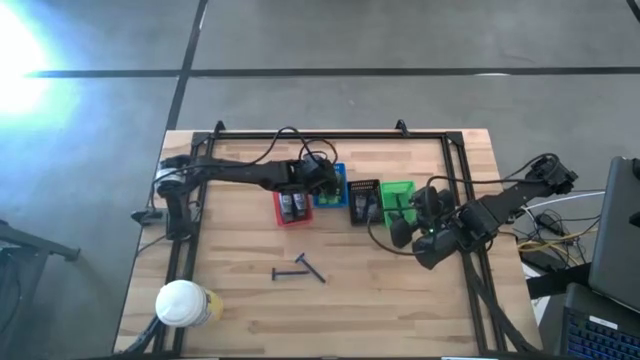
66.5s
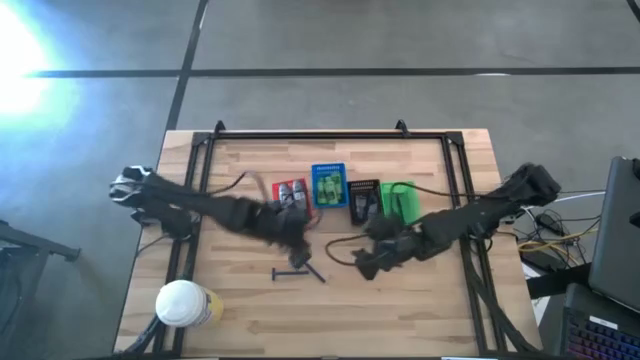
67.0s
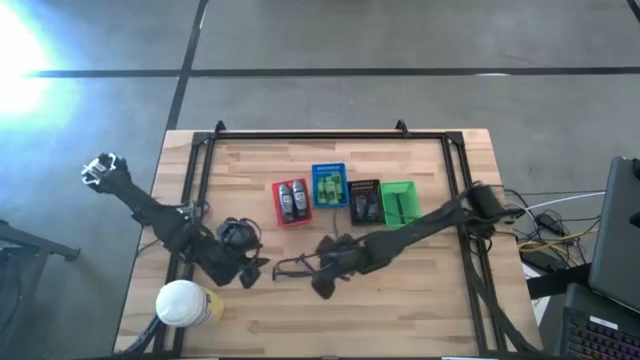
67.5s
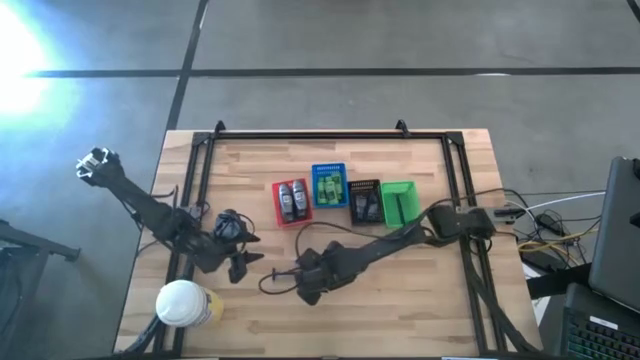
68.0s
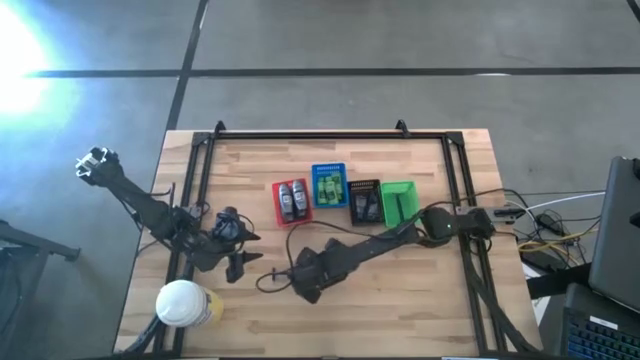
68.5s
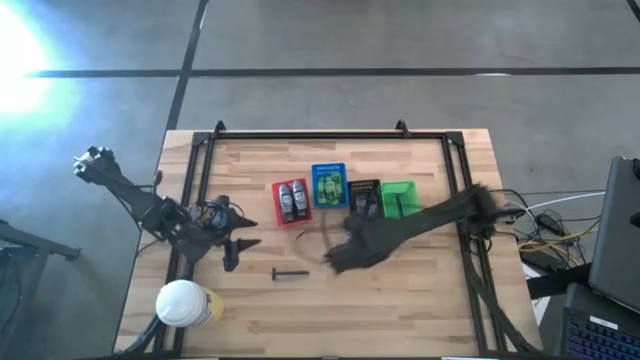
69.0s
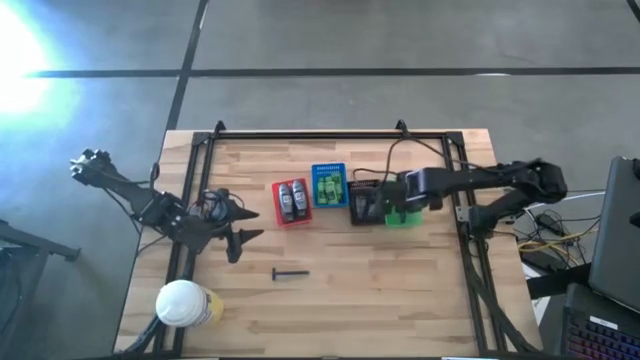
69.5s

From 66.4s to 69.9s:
Task: Pick & Place Travel size toiletries
Put the blue razor into the green bin

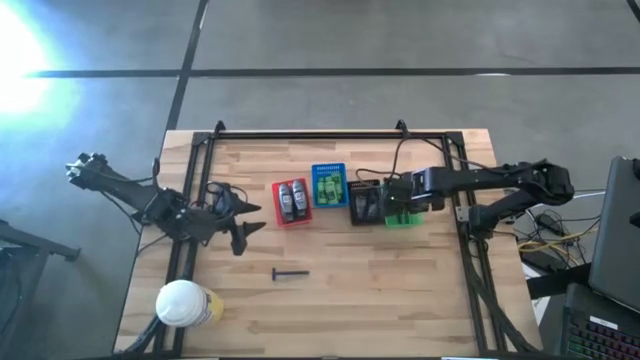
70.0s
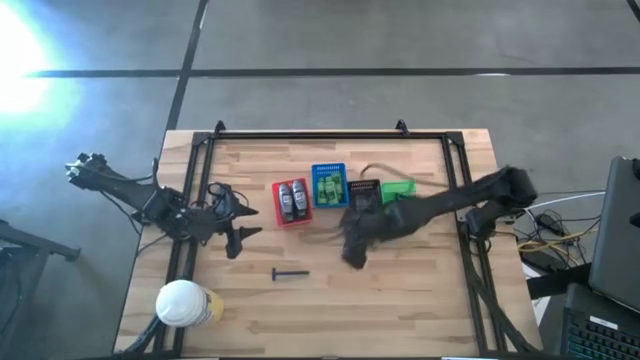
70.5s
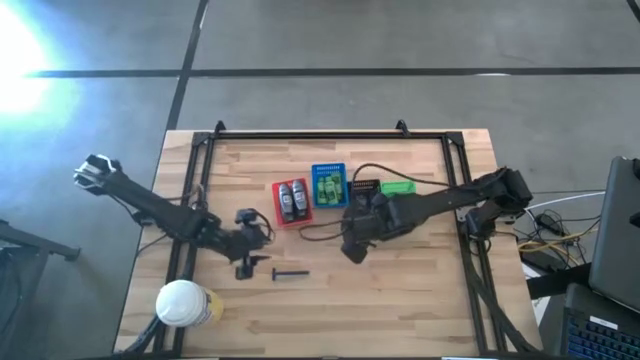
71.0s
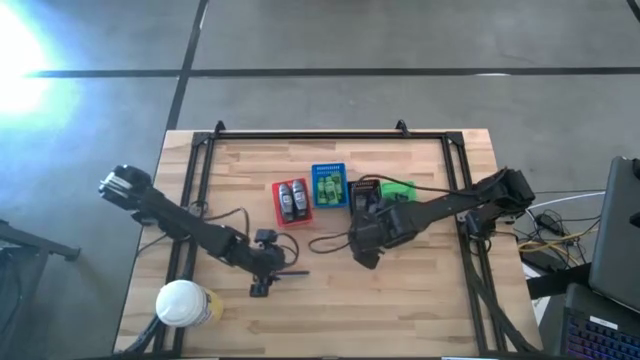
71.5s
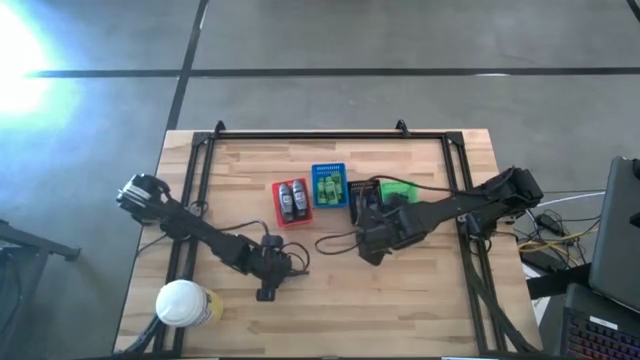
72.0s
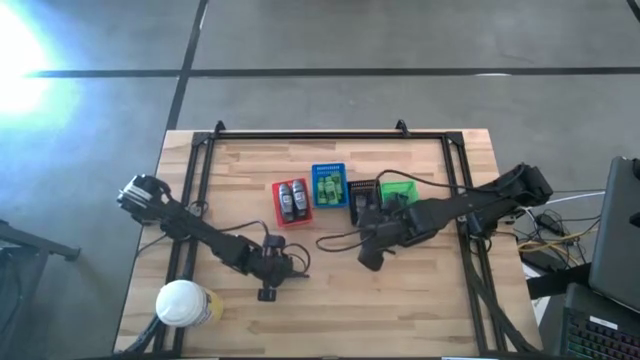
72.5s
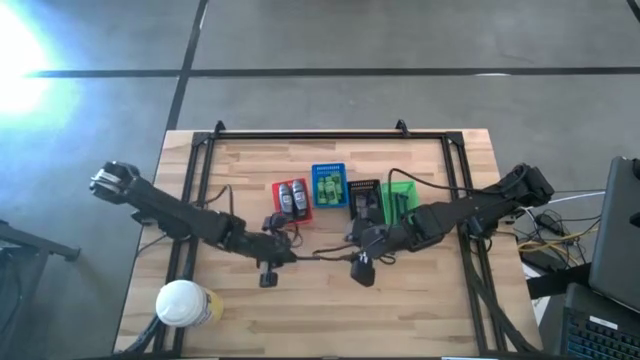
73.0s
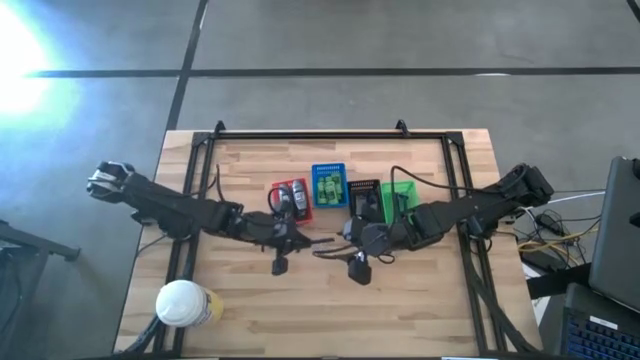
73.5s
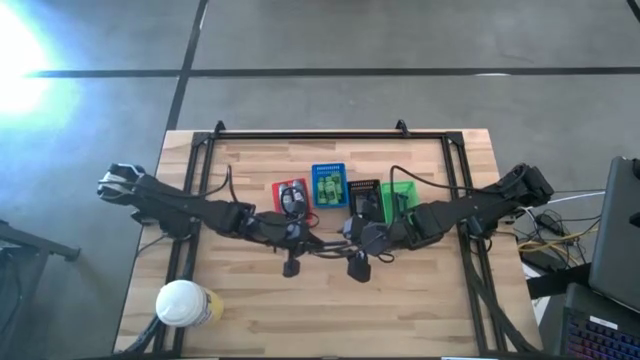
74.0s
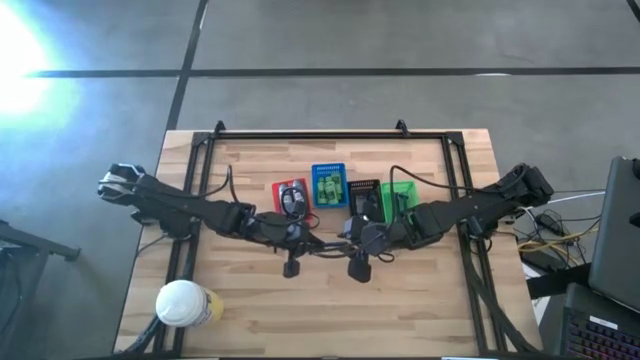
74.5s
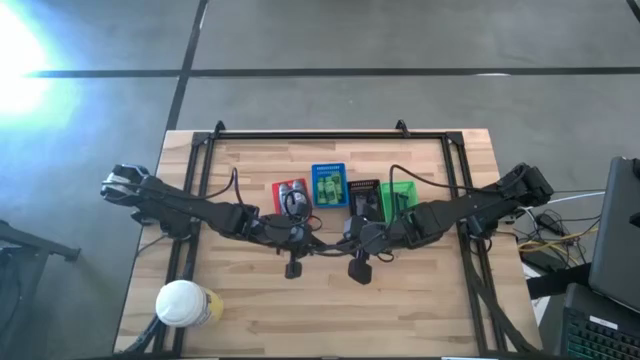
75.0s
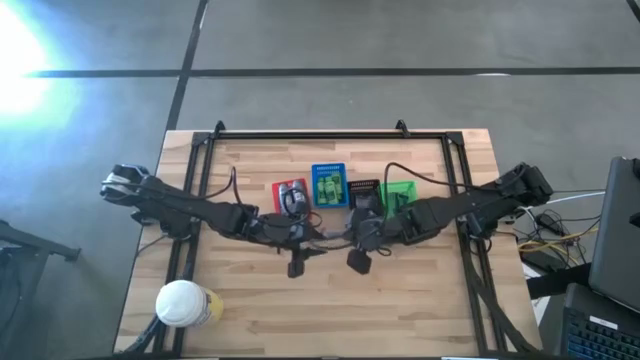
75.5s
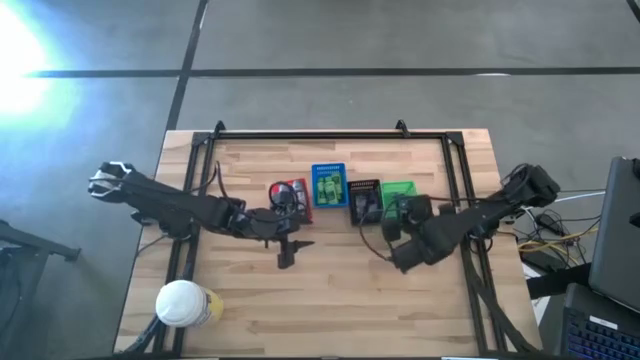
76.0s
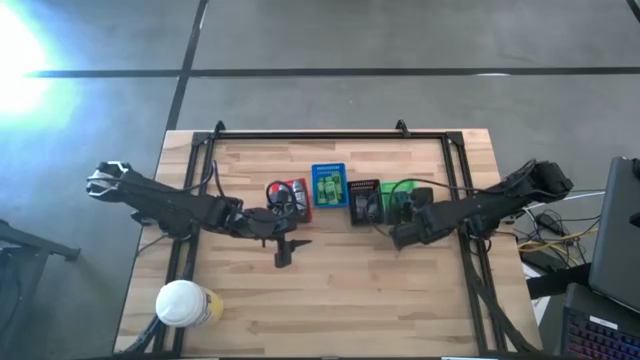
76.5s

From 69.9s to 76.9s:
Put the blue razor into the green bin

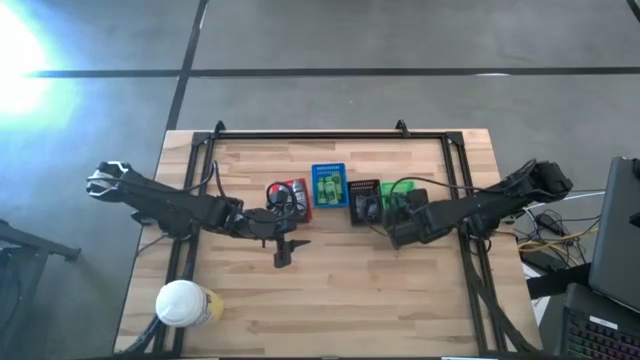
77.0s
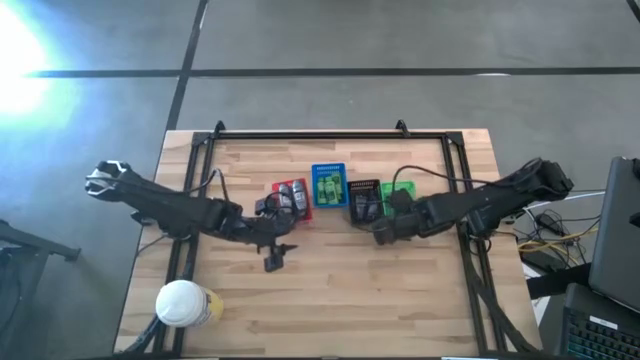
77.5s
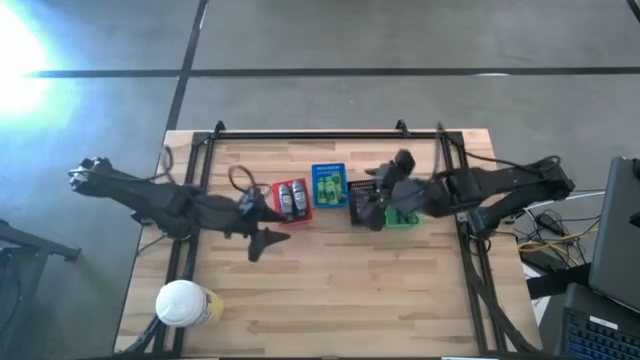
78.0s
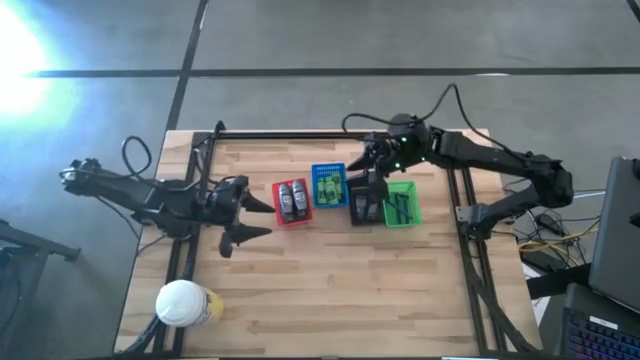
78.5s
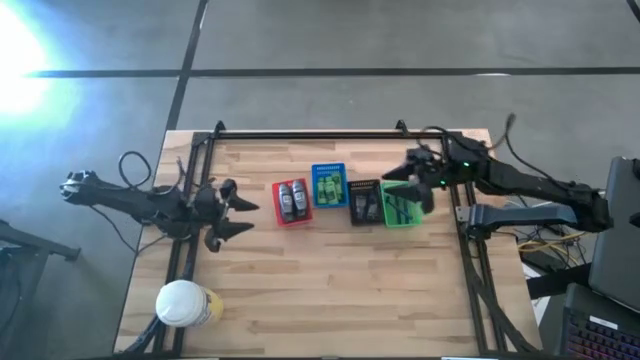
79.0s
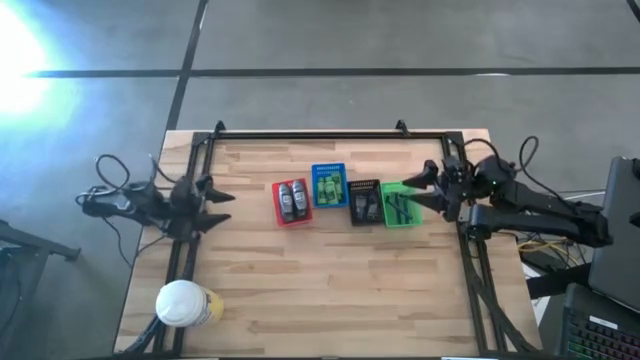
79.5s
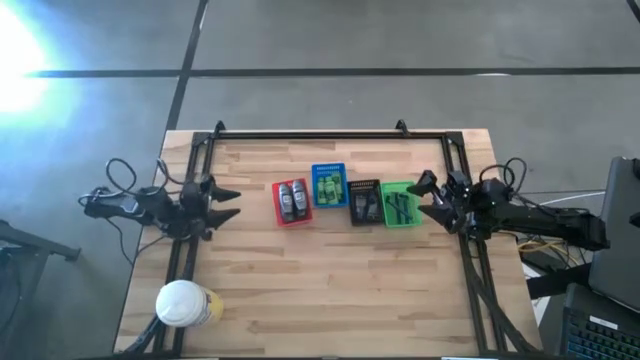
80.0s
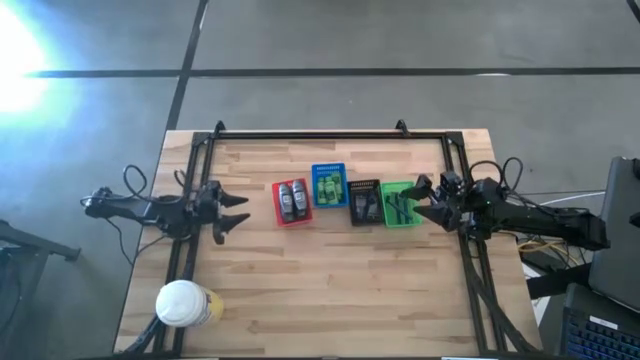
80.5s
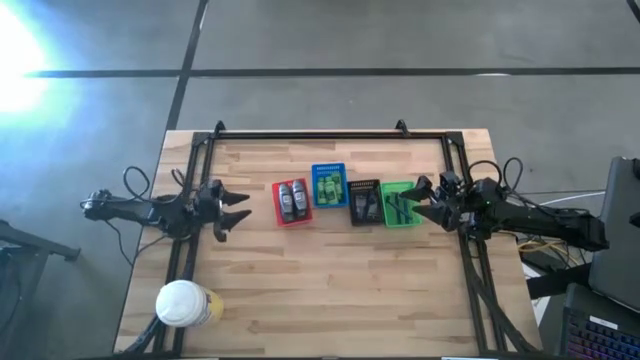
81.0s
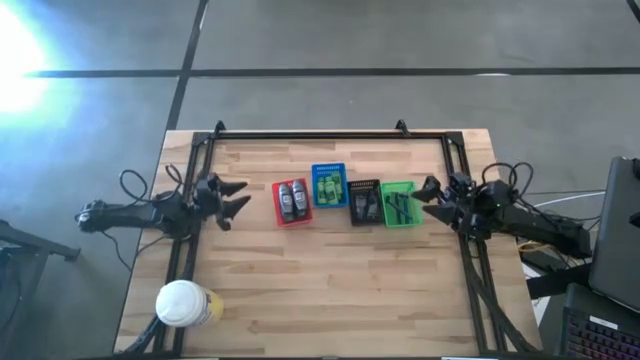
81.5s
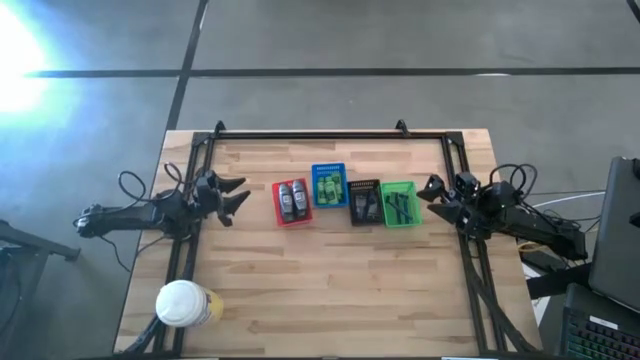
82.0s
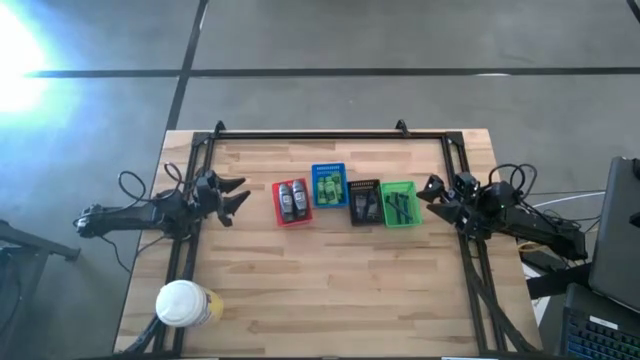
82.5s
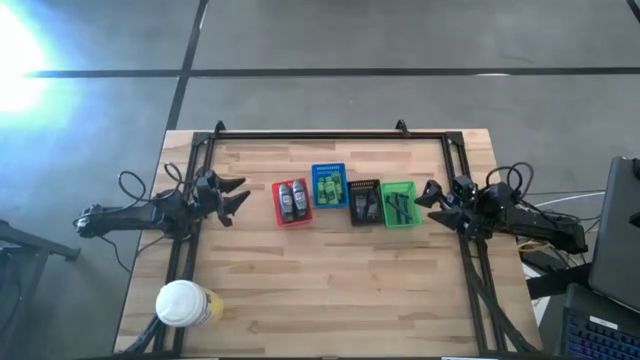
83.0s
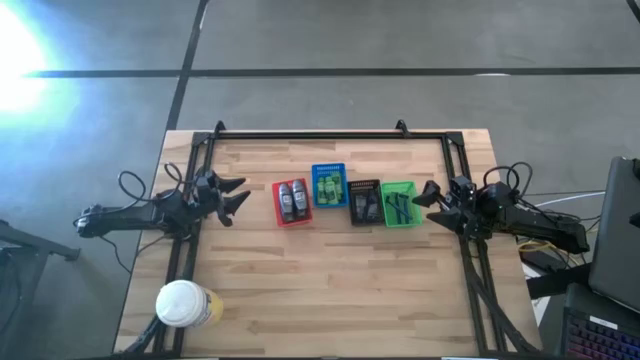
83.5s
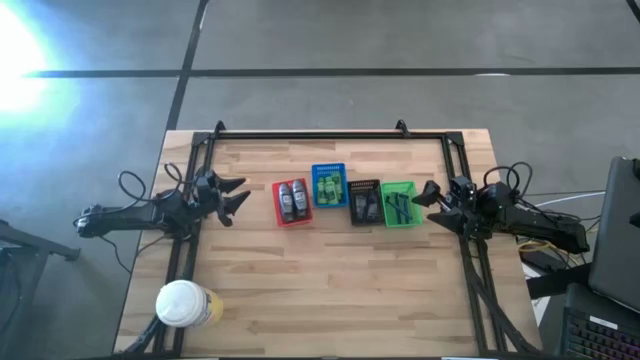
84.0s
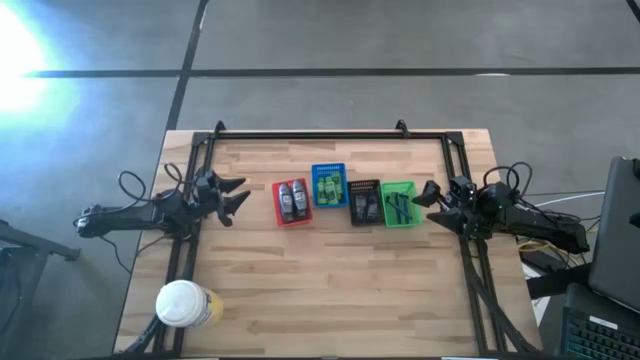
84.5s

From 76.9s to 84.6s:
Return to Home Position

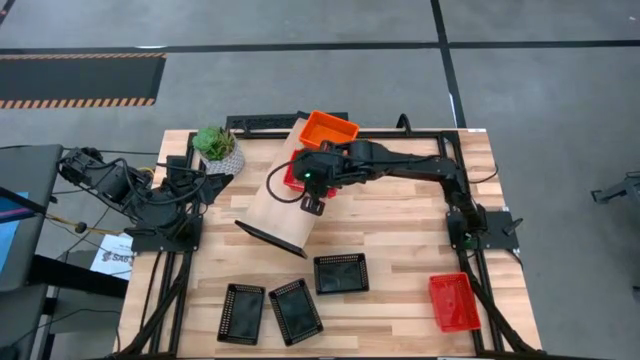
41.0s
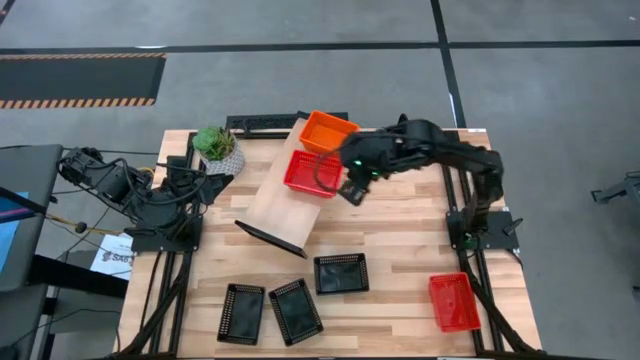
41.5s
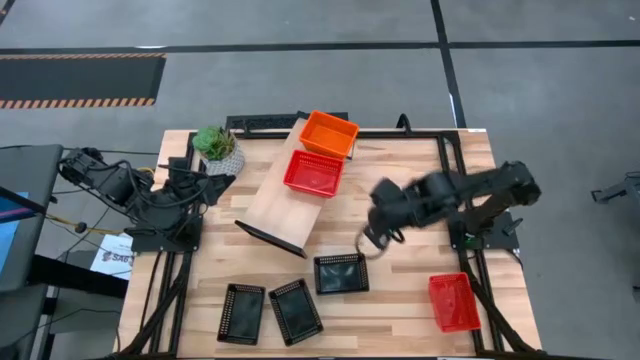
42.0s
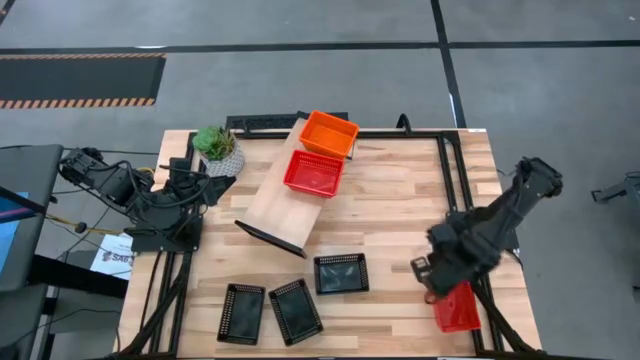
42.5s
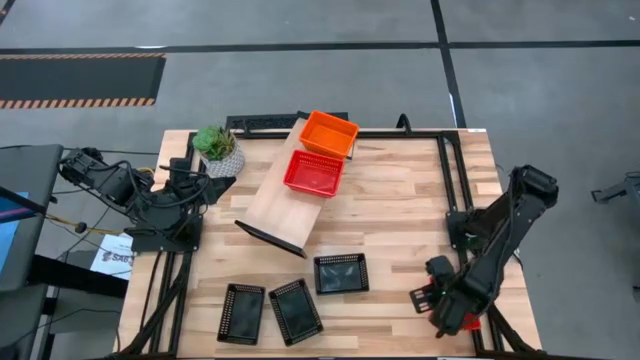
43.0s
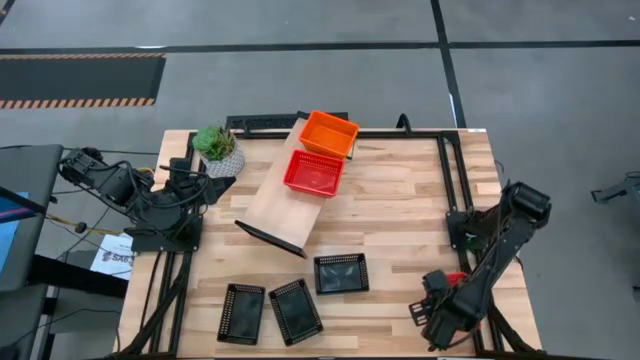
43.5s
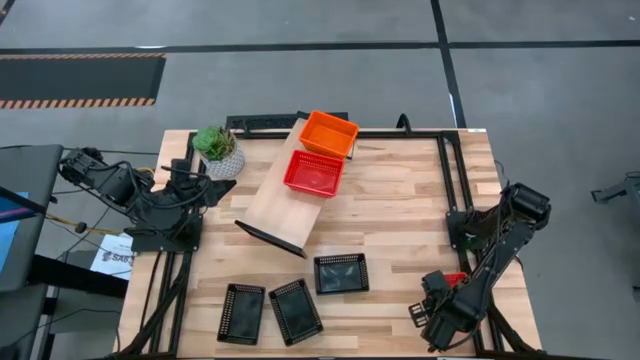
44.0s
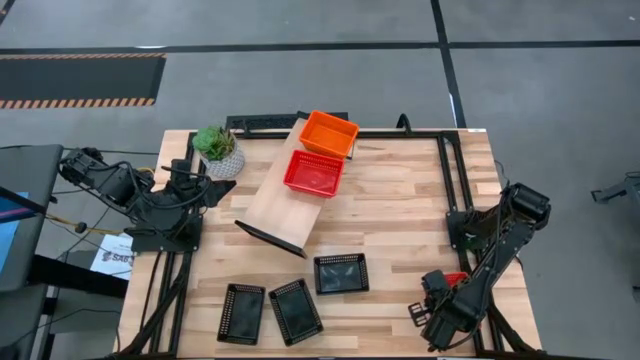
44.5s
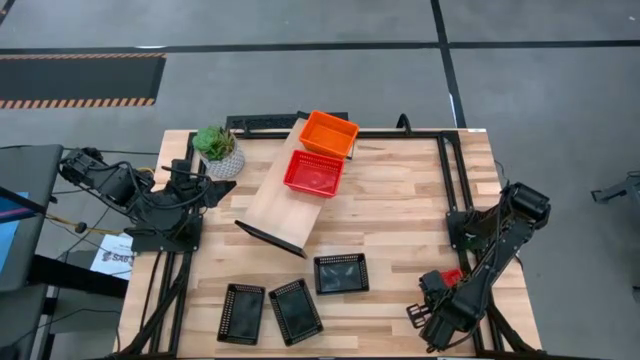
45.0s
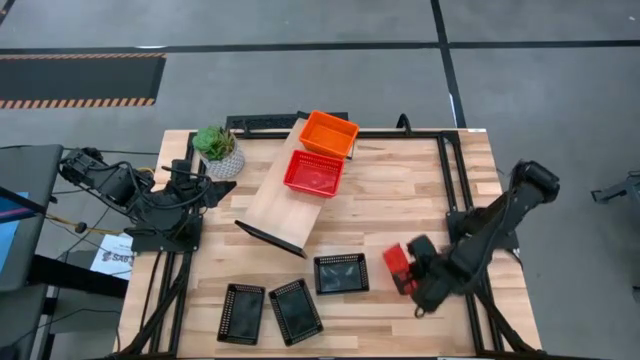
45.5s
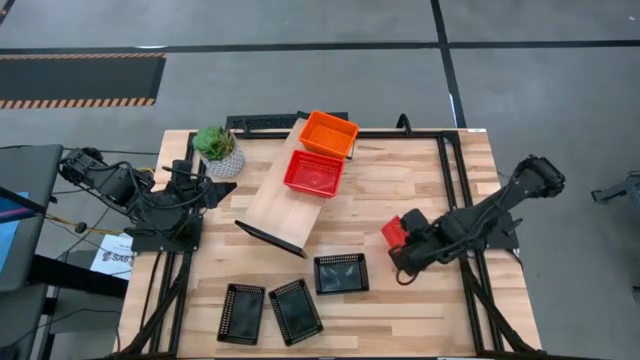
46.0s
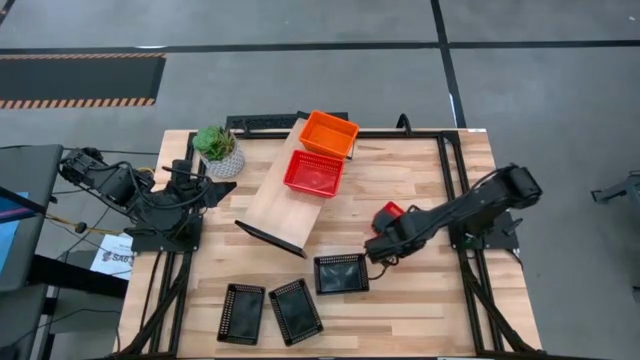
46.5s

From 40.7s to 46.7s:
Task: Stack baskets on shelf by color
Stack the red bin on top of the stacked red bins on the shelf
